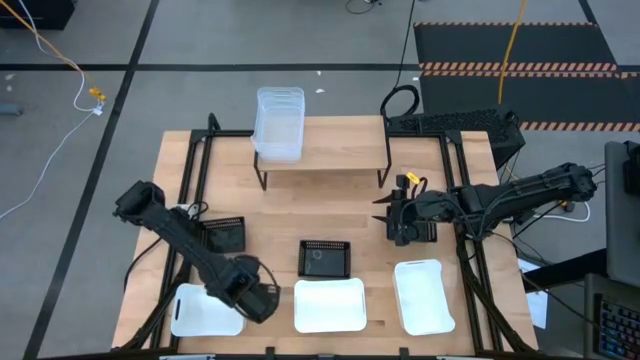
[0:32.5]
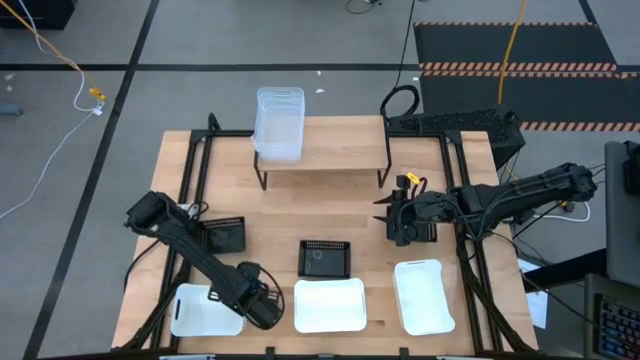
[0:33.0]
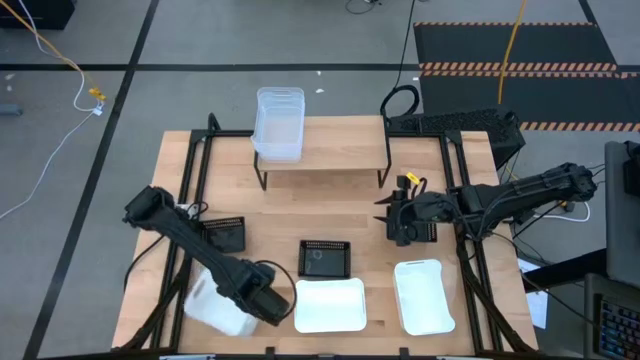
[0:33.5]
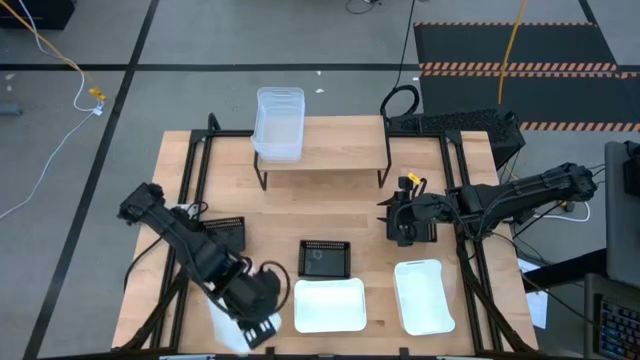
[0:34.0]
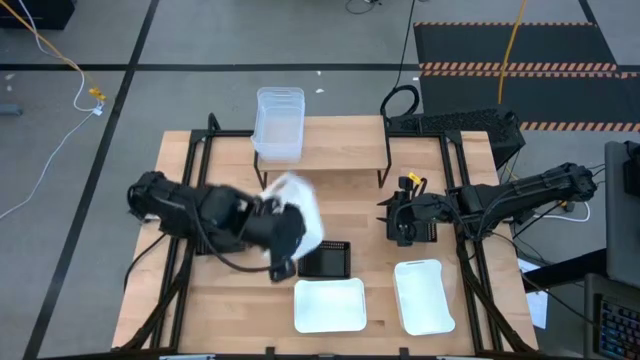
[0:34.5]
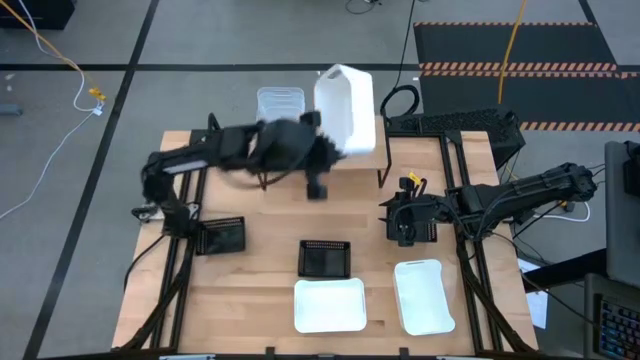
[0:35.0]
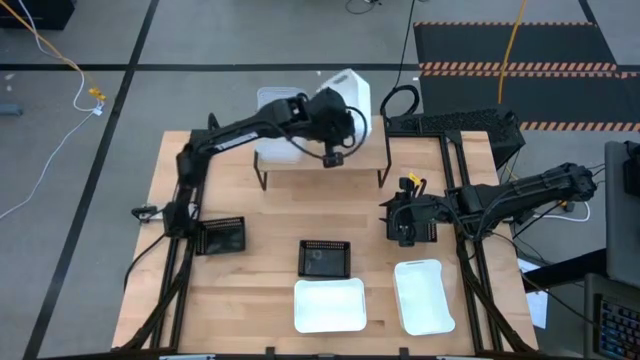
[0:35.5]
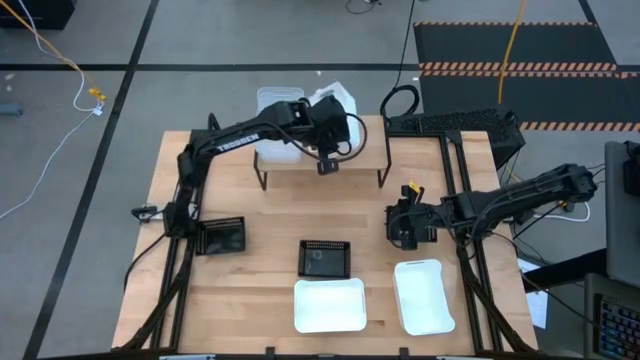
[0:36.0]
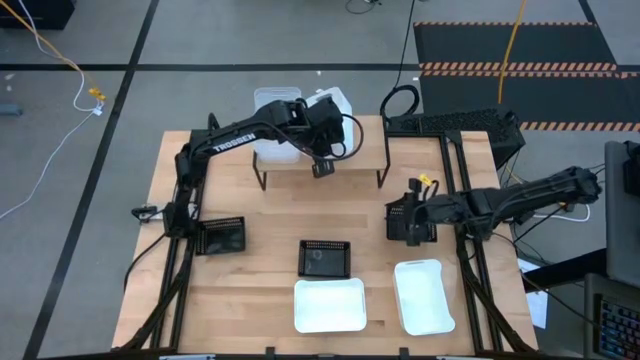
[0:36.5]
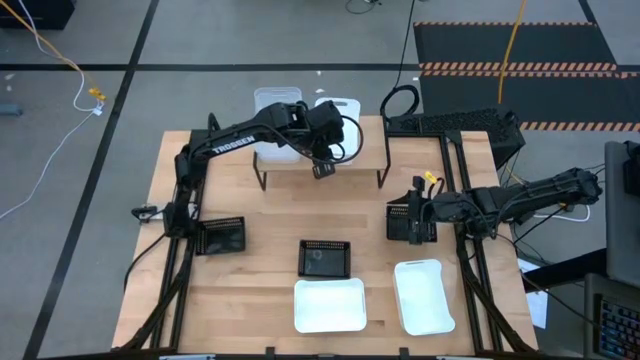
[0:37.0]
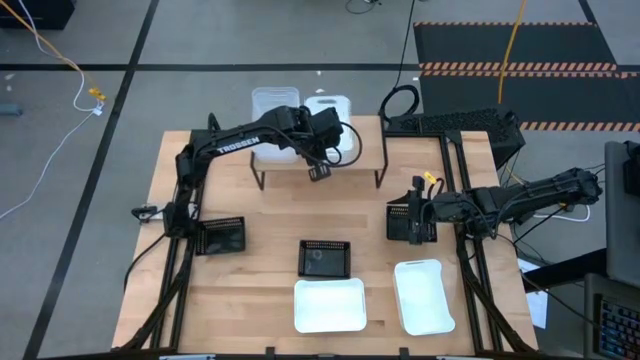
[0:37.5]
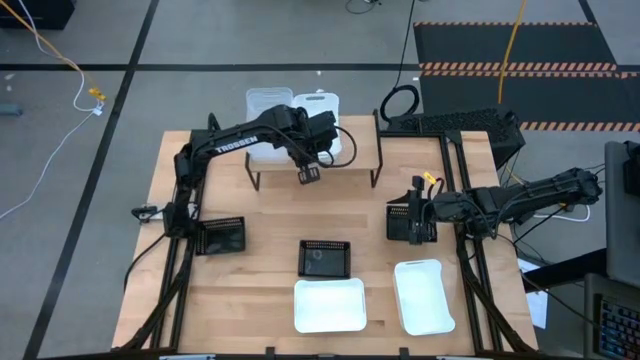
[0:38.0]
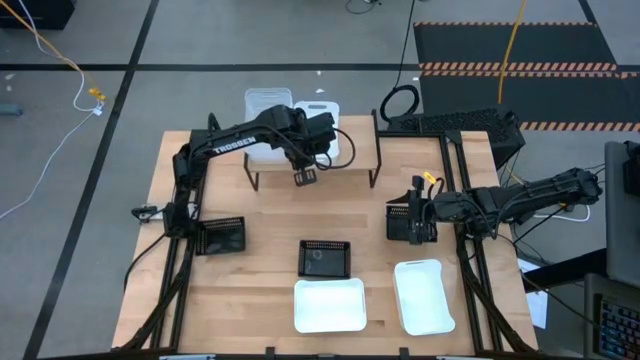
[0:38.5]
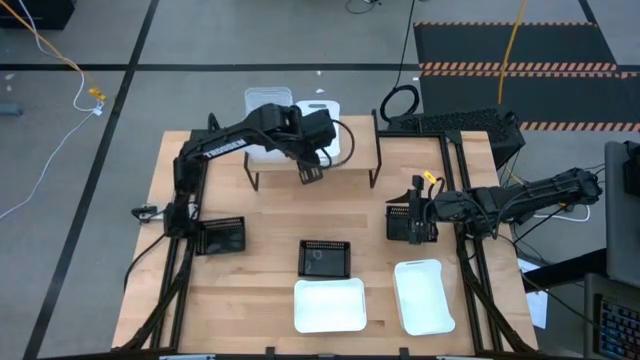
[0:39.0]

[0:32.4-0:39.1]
Task: Stack baskets on shelf by color
Put the left white bin on the shelf

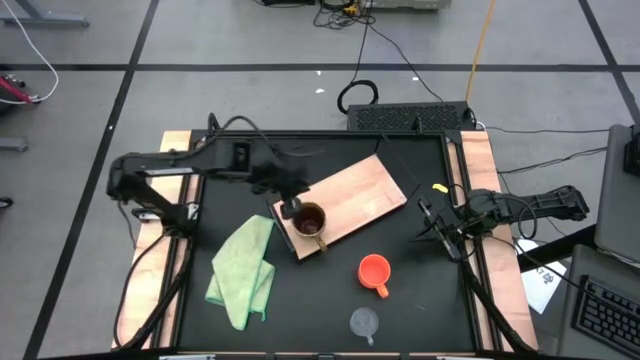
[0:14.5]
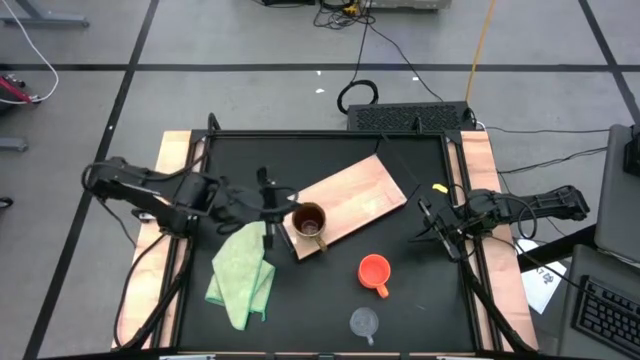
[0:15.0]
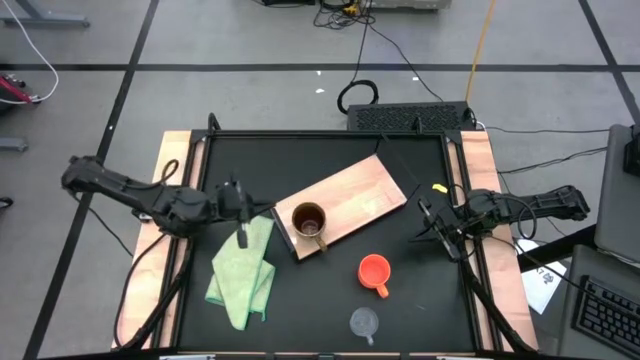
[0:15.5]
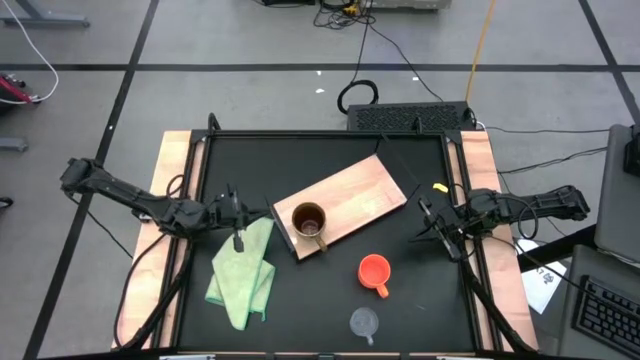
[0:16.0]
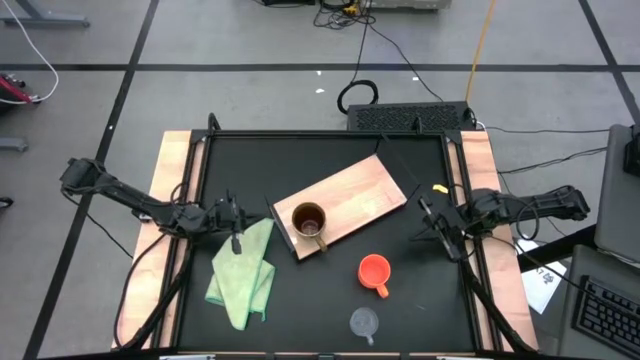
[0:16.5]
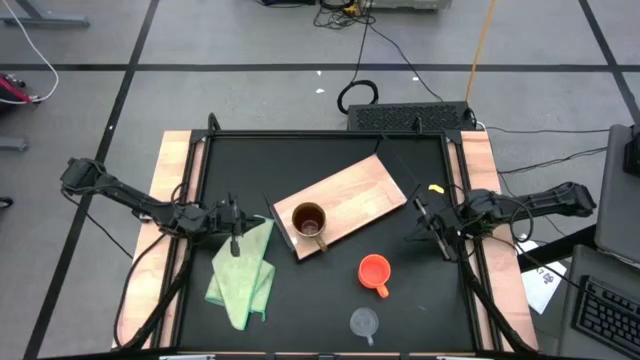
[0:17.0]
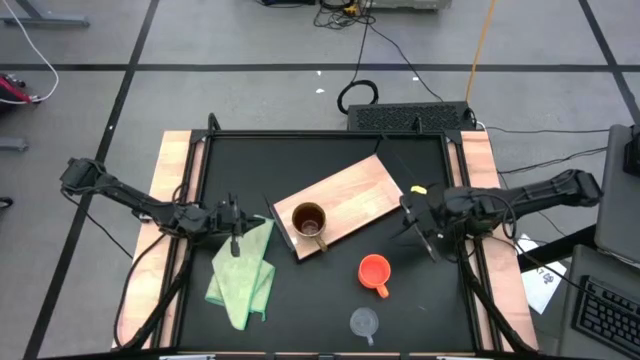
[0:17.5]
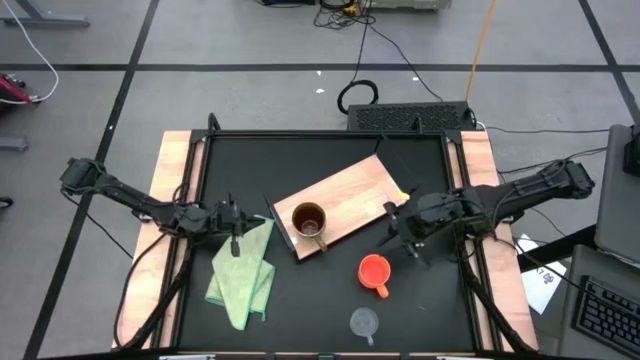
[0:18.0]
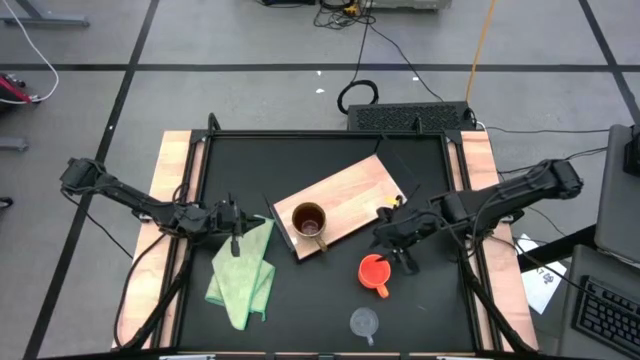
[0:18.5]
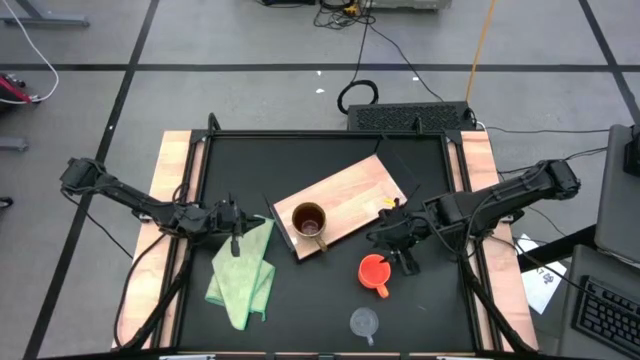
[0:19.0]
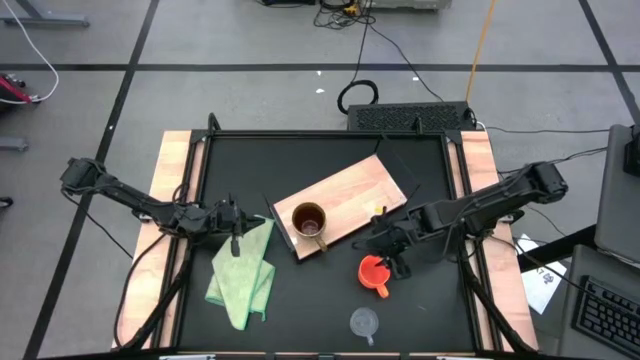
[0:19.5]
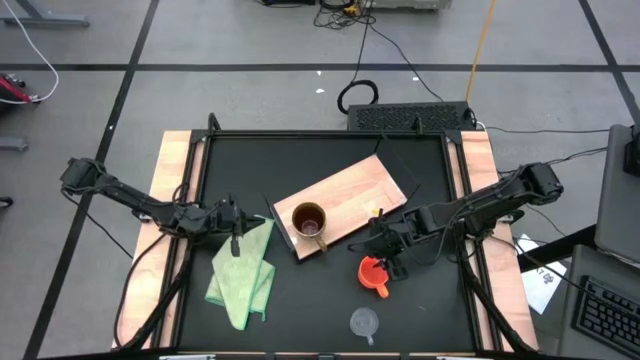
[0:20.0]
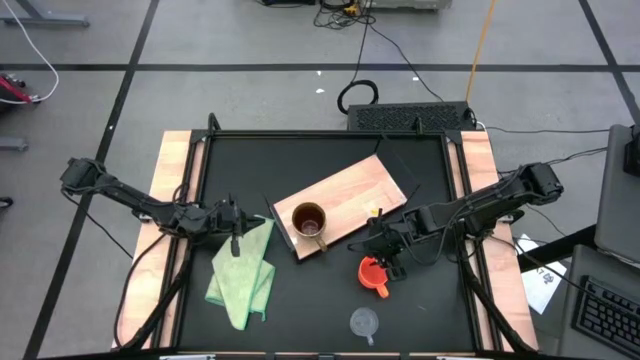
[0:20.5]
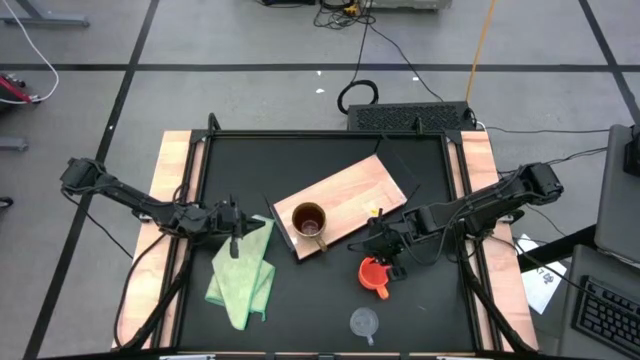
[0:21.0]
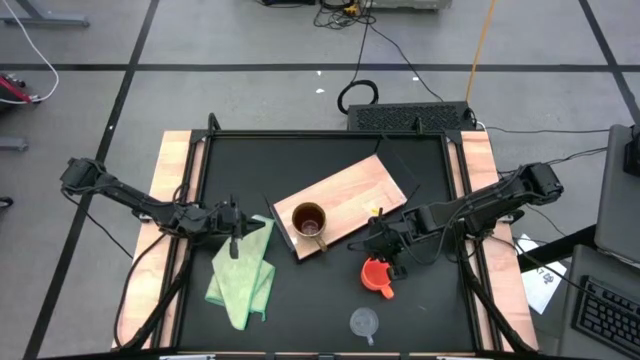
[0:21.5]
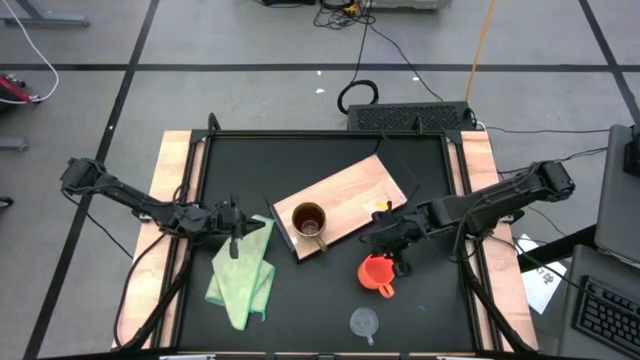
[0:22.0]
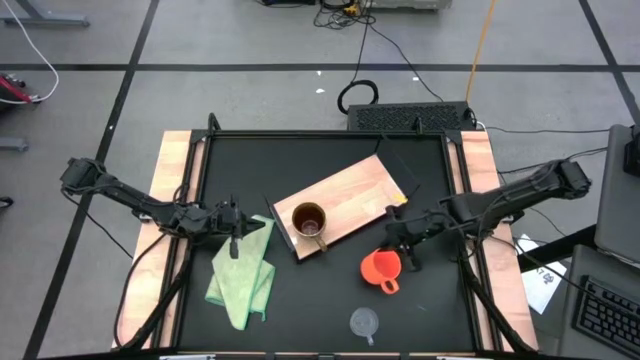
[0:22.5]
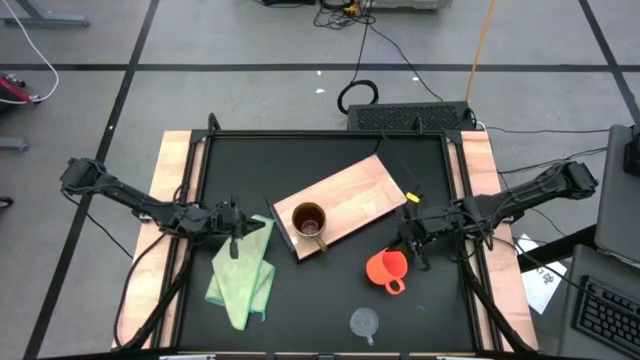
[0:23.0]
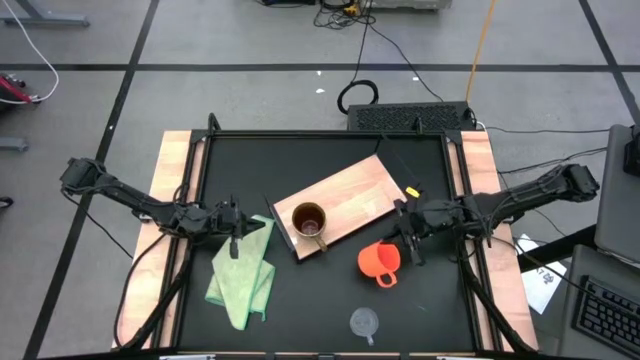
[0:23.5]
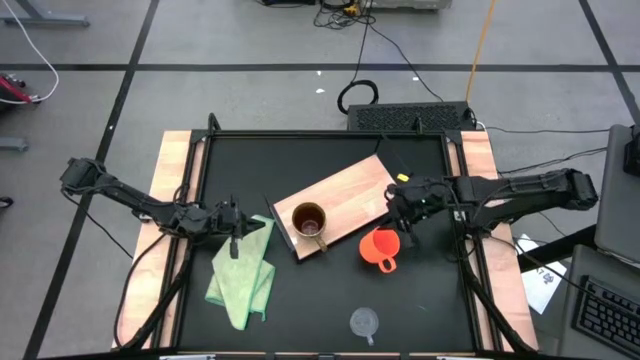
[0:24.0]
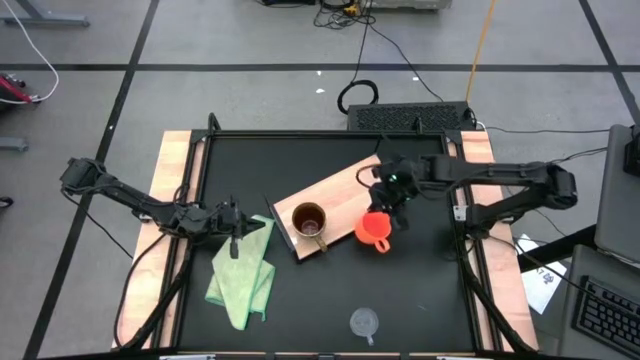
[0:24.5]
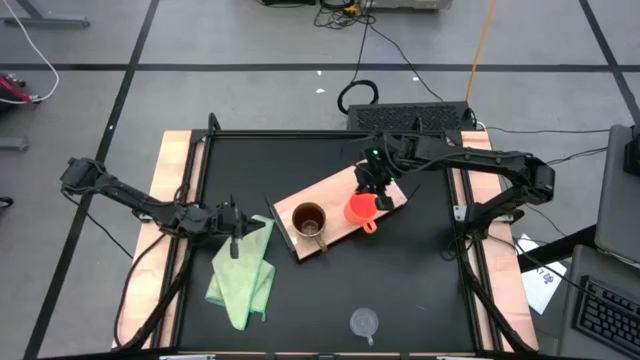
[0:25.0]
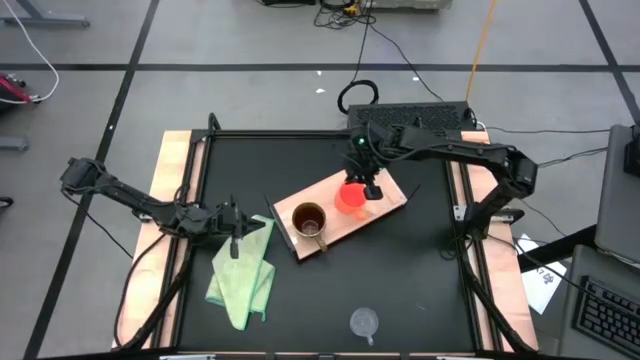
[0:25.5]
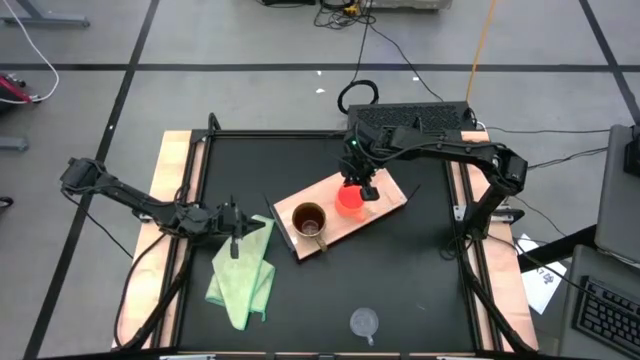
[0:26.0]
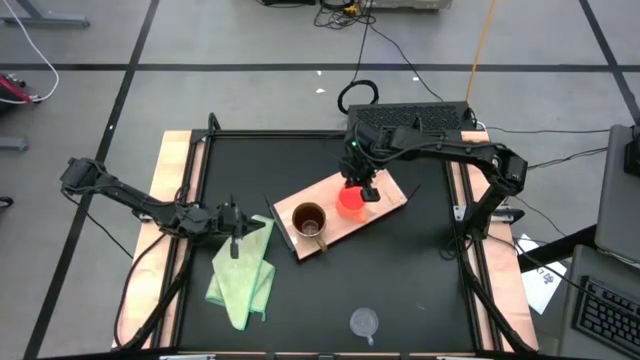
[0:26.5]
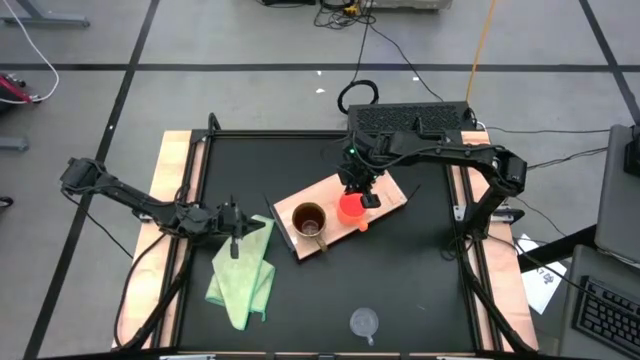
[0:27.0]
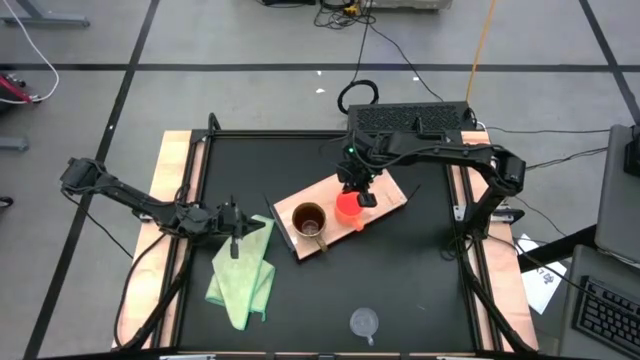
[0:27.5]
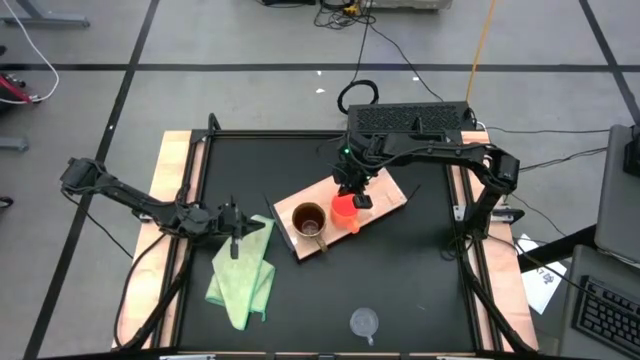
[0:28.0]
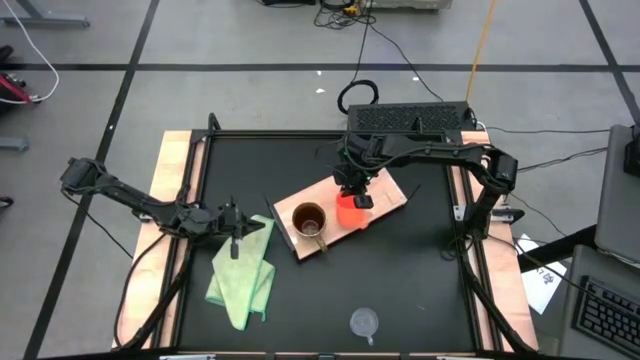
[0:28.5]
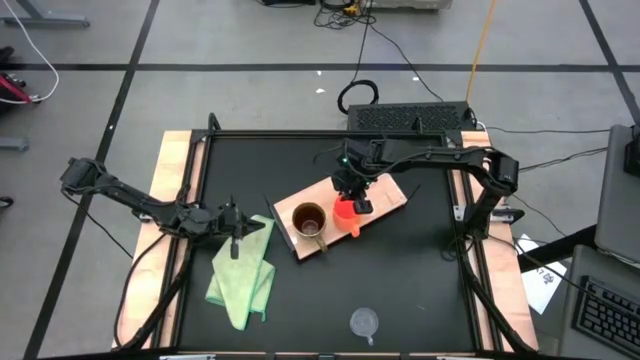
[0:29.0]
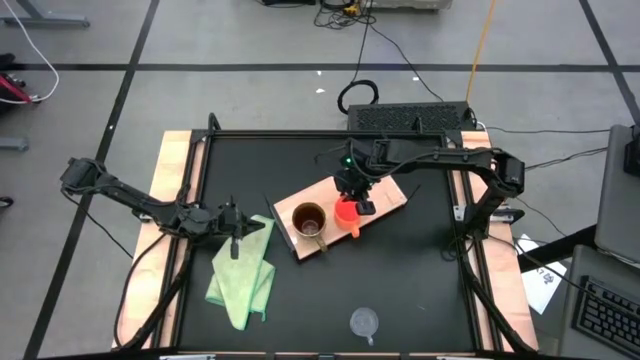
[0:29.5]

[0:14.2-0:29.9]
Task: Stack small to large cups/mugs on shelf
Put the orange mug on the shelf
